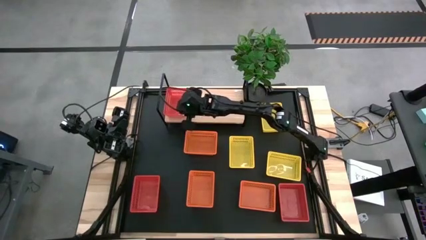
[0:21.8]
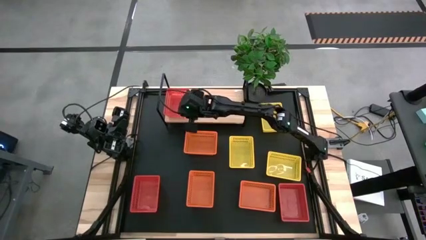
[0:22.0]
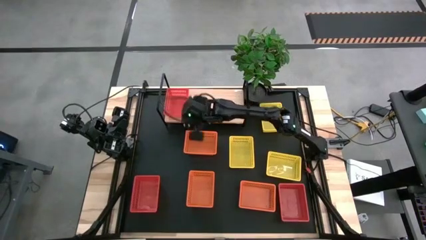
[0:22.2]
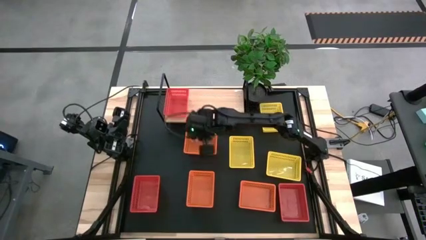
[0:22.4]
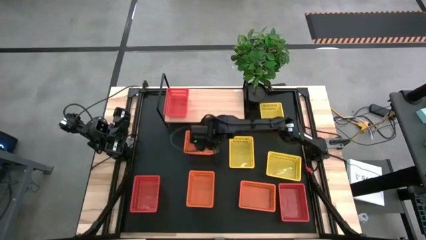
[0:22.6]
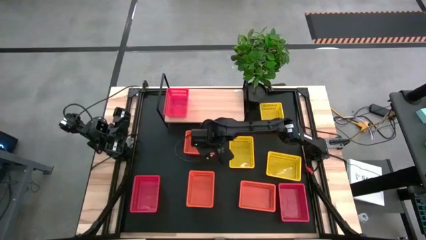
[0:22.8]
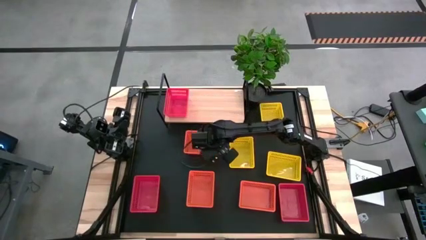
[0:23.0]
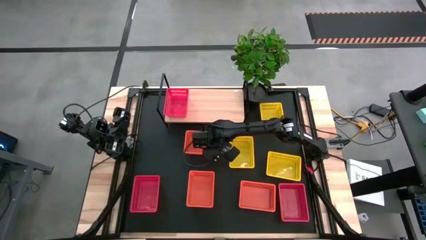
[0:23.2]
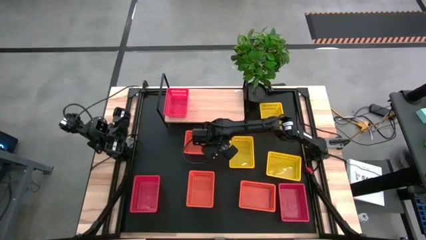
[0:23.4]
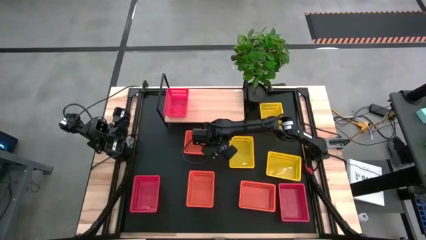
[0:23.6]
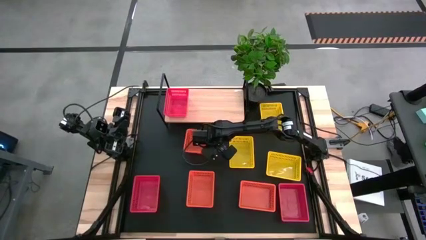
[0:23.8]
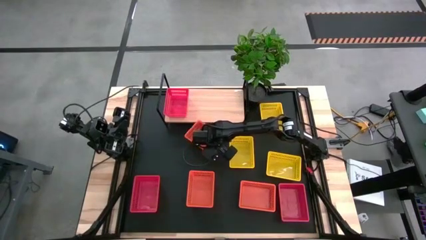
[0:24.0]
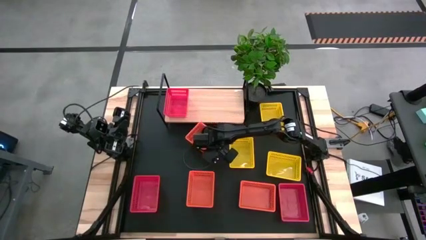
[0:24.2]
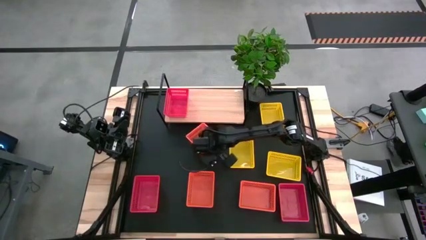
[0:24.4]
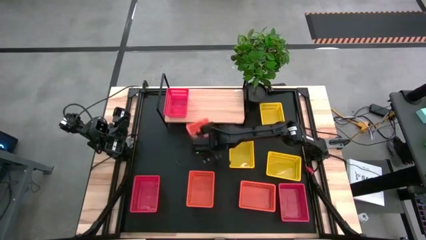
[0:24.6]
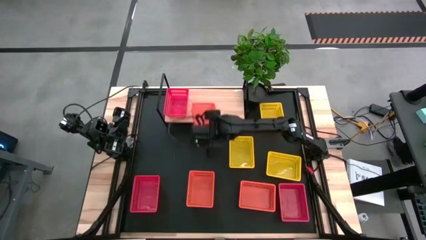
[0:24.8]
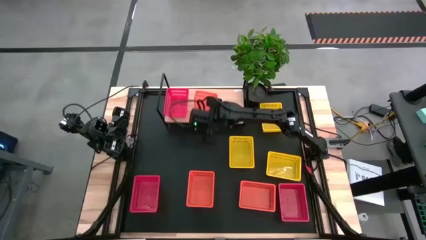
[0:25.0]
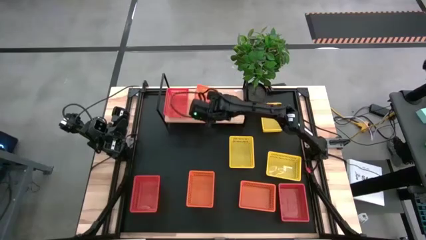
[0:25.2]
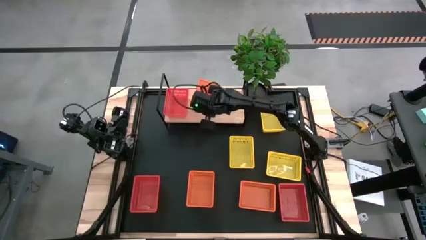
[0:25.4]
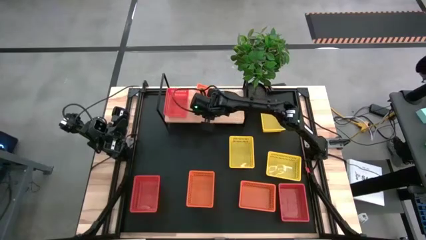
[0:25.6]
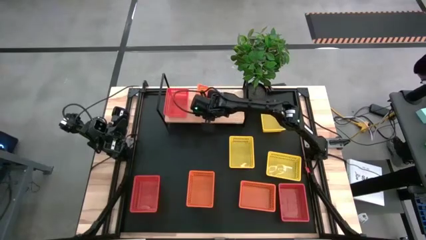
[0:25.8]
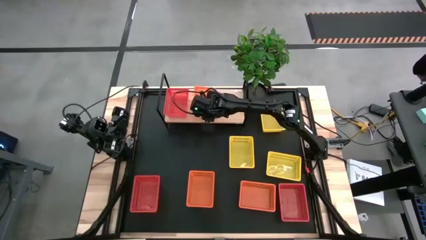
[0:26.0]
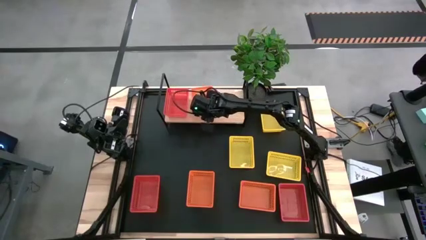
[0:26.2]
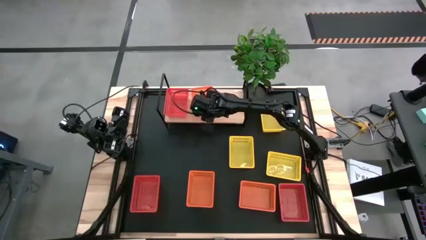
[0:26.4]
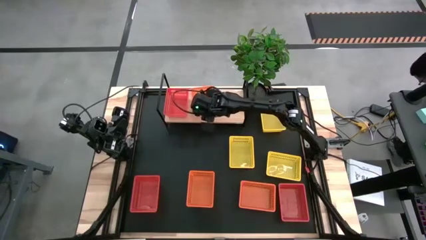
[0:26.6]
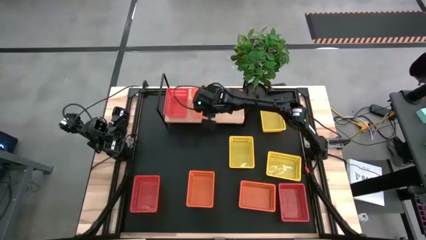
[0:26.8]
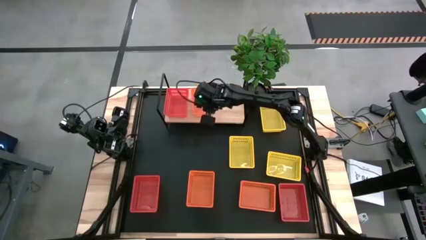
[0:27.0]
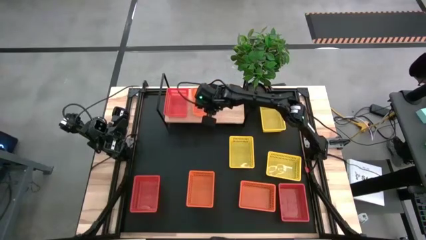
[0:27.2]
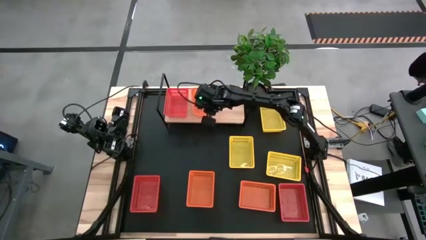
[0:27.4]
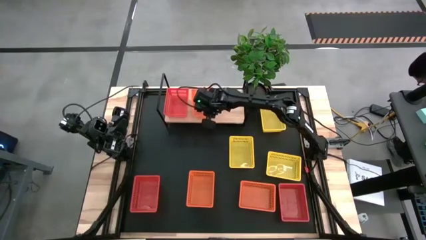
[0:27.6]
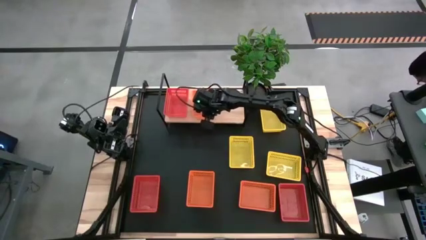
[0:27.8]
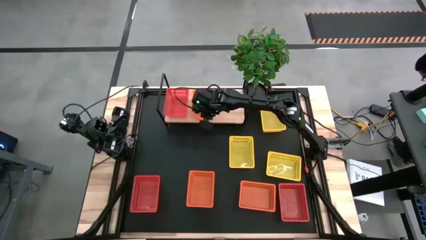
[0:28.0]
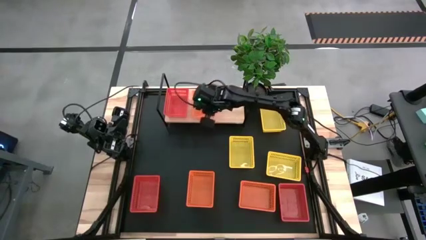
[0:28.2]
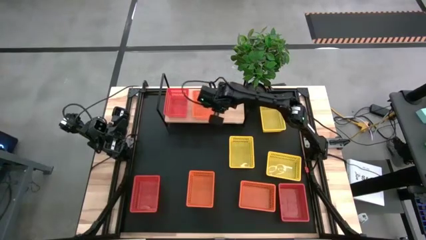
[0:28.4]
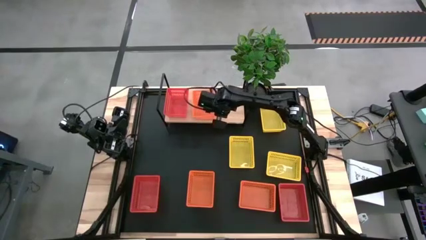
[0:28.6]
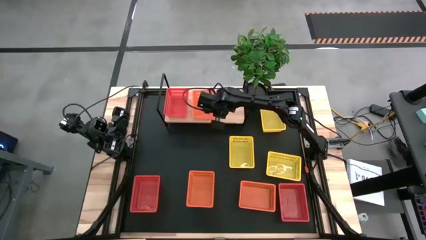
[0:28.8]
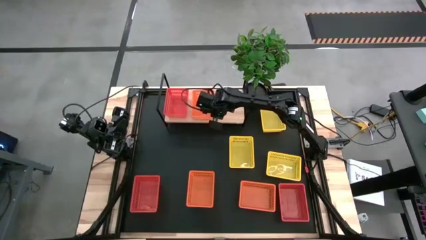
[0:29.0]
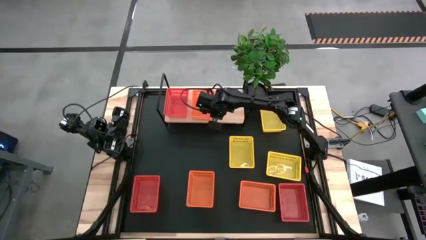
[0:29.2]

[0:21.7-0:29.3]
Task: Stack baskets on shelf by color
Put the top orange bin on the shelf

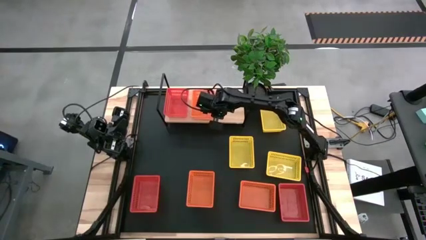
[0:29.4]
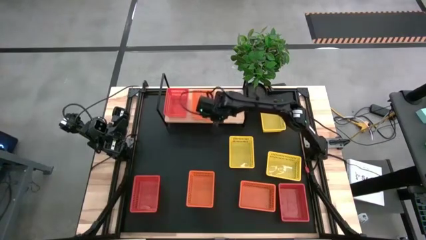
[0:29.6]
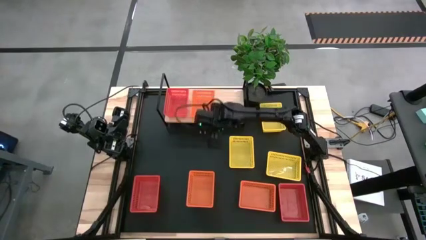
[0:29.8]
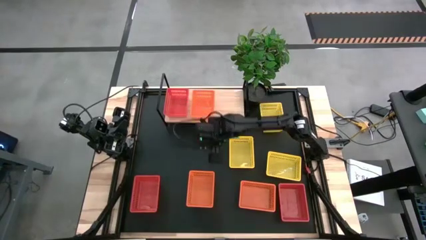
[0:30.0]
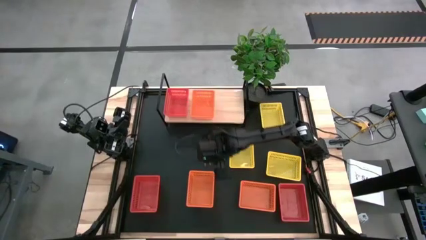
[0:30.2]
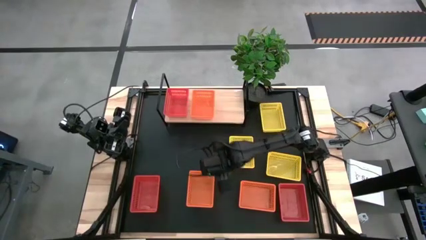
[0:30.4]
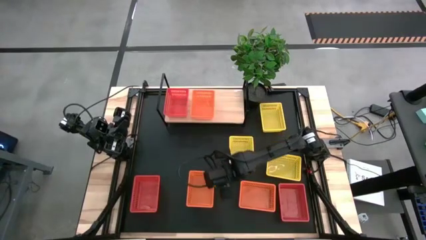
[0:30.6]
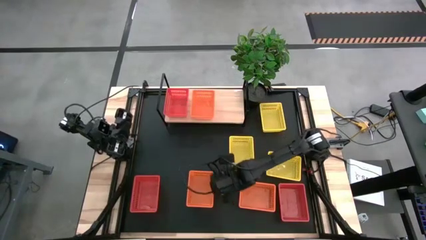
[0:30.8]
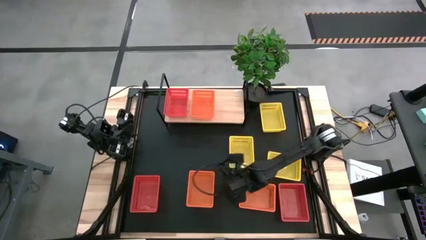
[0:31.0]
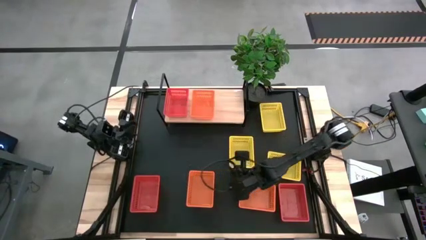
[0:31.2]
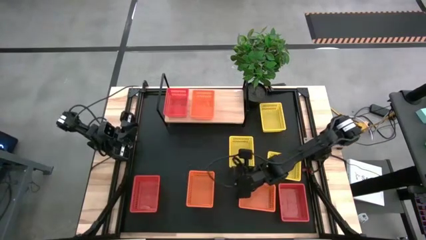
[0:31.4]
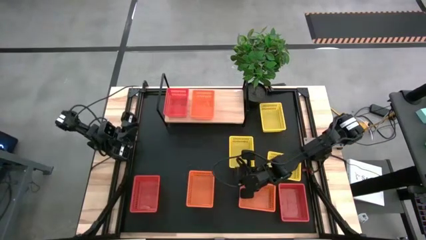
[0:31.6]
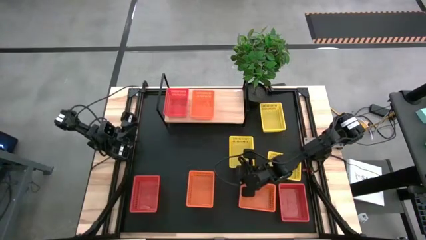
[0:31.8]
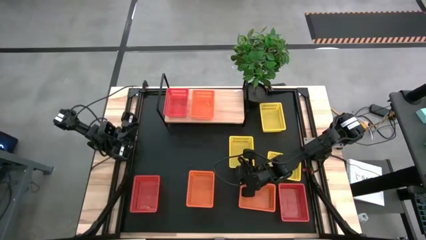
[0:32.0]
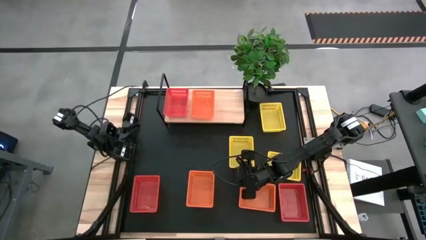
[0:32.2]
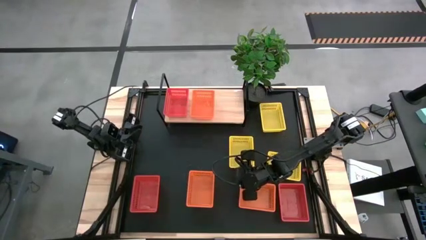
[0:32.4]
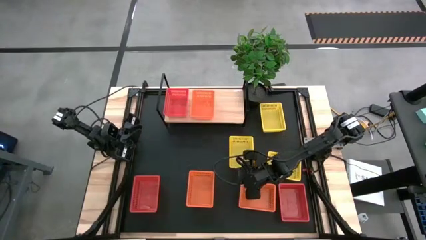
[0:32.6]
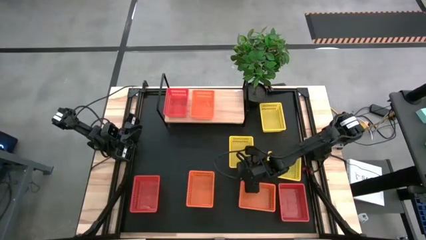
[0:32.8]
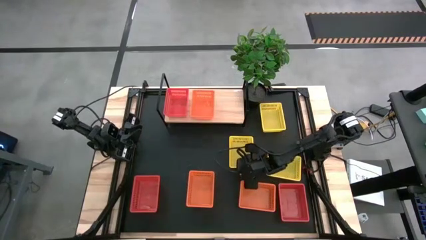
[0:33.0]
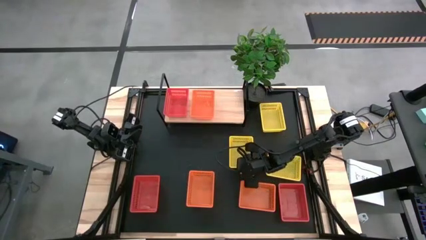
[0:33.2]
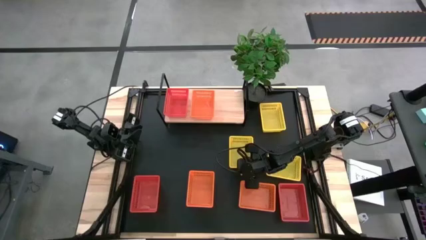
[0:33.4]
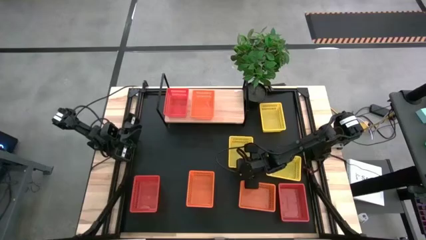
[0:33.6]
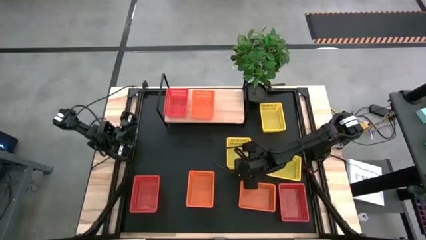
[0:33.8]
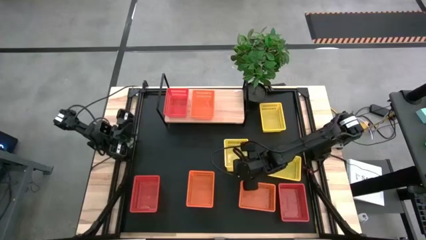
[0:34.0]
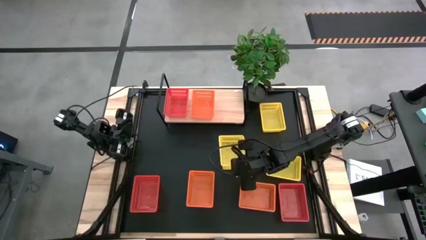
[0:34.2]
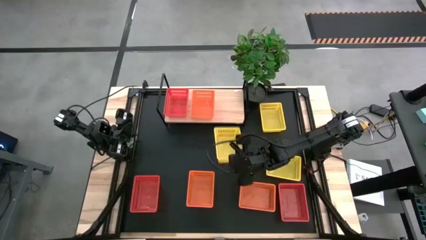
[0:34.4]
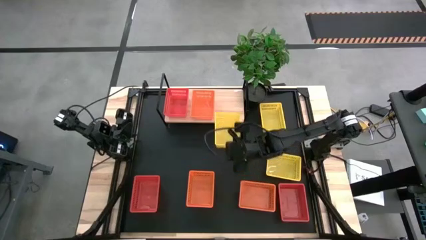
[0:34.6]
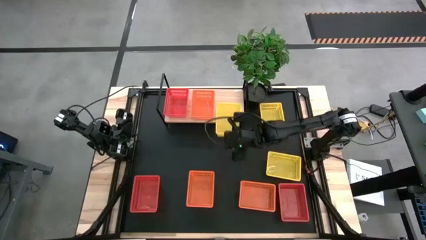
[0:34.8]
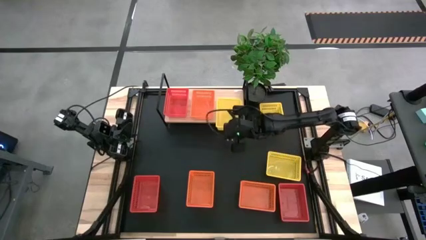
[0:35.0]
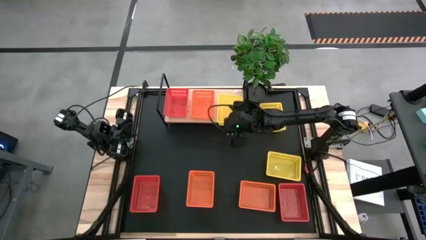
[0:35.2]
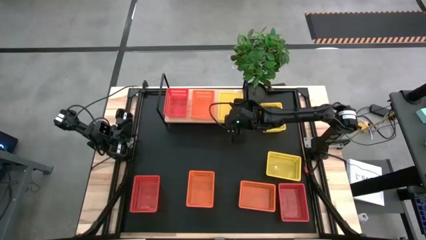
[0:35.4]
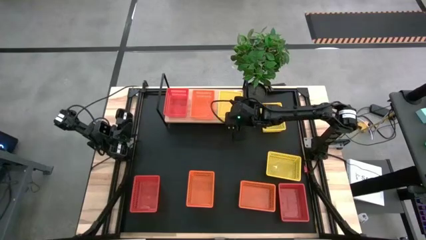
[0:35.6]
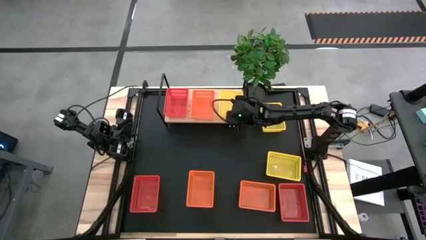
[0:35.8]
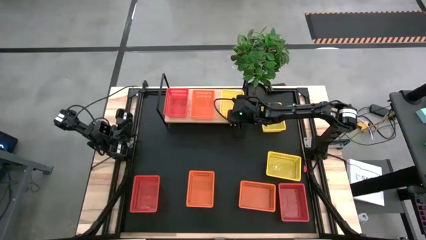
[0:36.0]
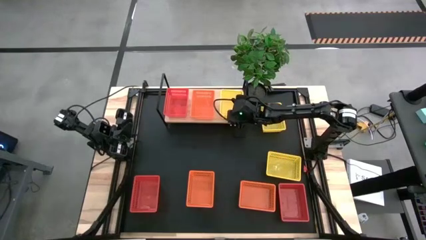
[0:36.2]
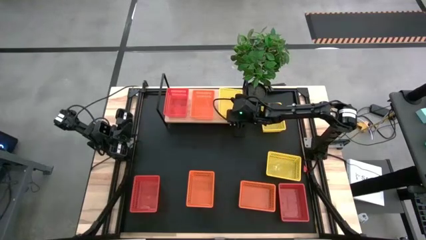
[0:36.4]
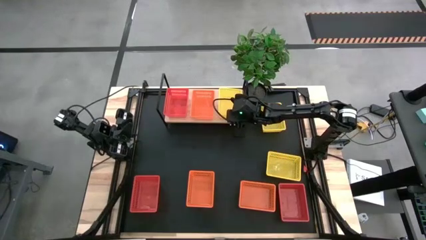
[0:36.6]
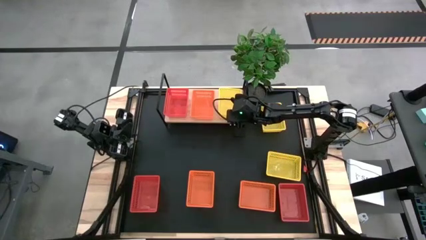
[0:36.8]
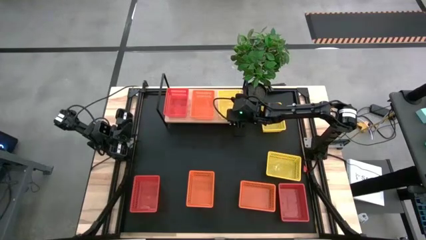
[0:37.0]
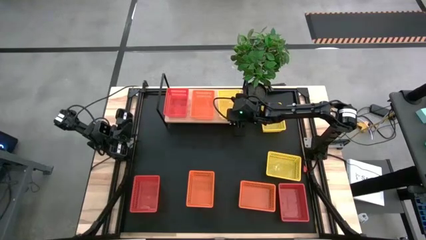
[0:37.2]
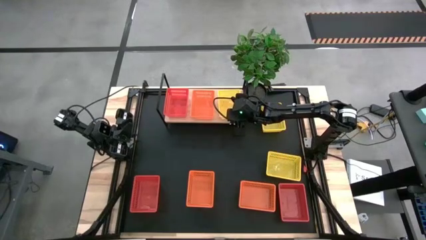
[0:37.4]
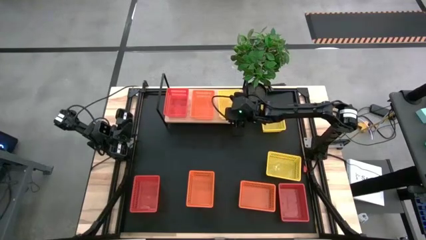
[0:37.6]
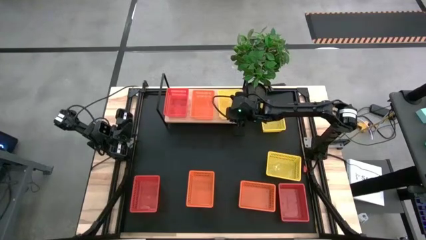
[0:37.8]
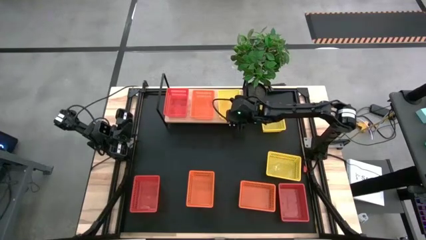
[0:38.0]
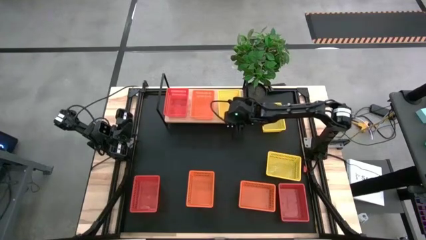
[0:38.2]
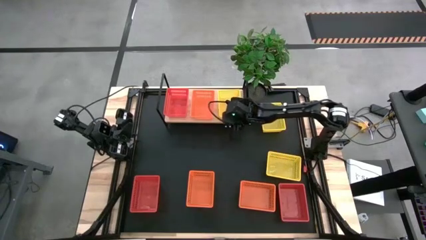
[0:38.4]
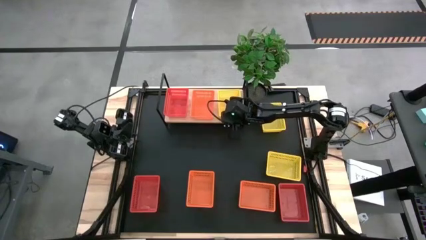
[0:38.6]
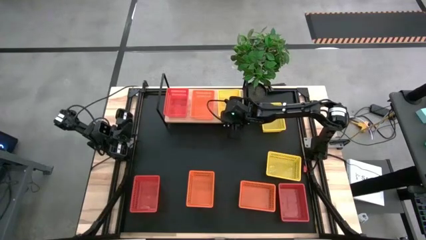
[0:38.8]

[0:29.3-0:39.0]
Put the bottom left yellow bin on the shelf
